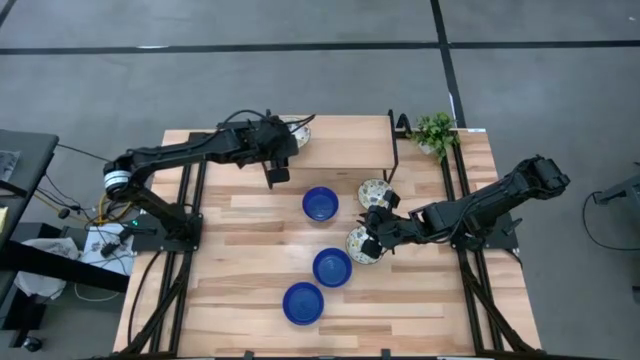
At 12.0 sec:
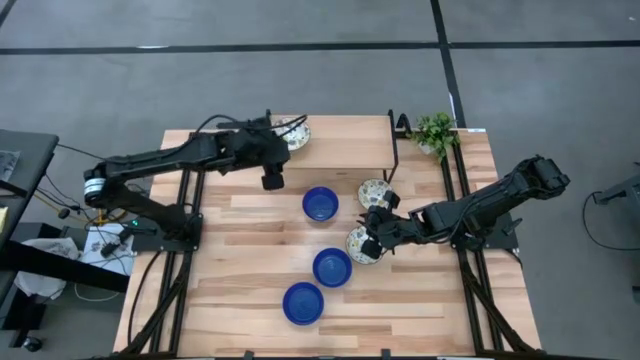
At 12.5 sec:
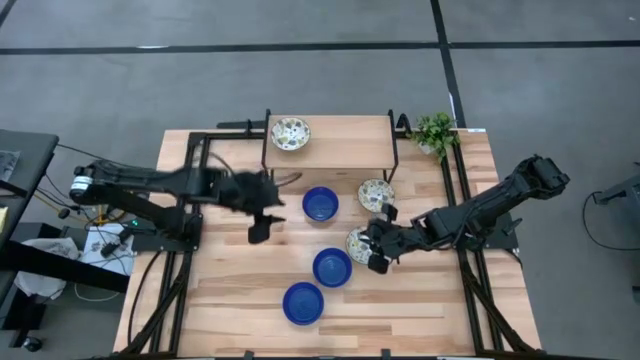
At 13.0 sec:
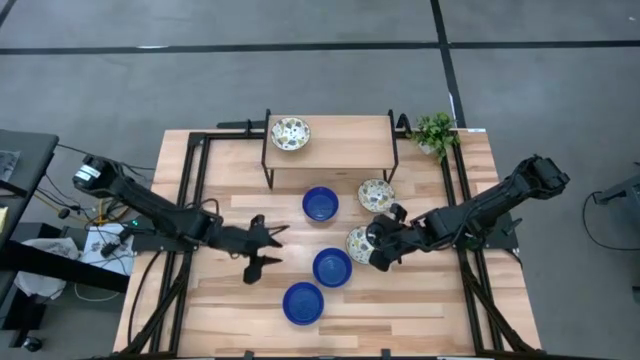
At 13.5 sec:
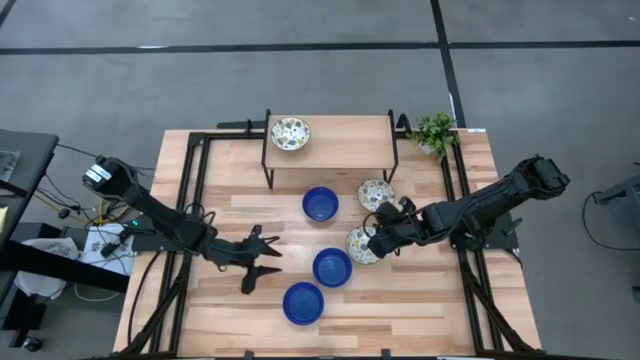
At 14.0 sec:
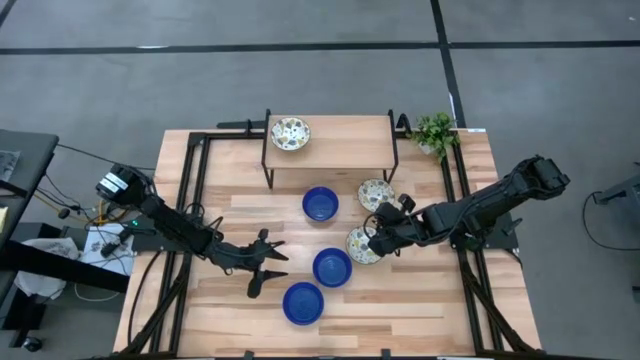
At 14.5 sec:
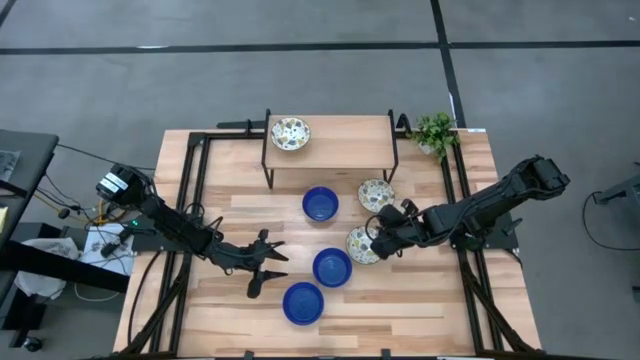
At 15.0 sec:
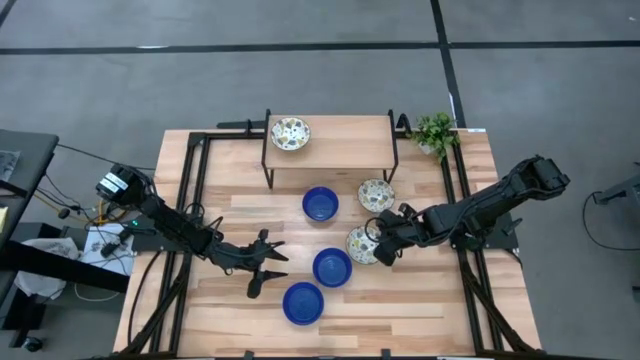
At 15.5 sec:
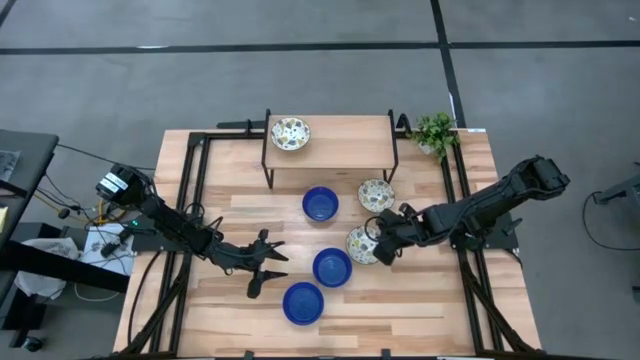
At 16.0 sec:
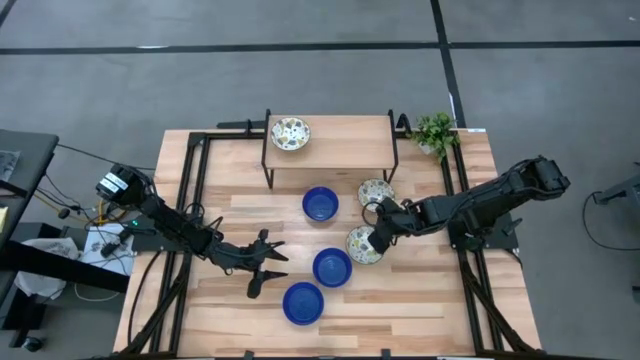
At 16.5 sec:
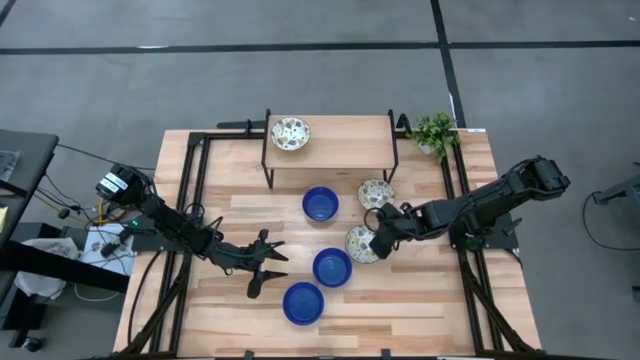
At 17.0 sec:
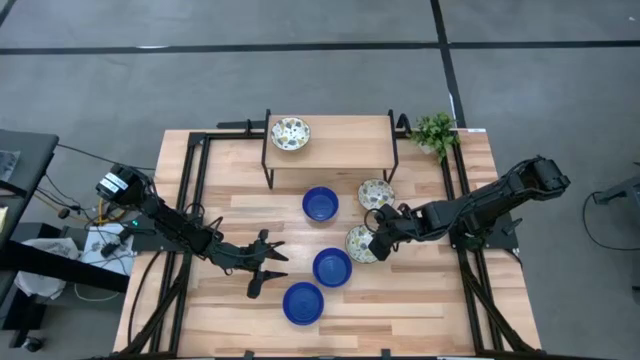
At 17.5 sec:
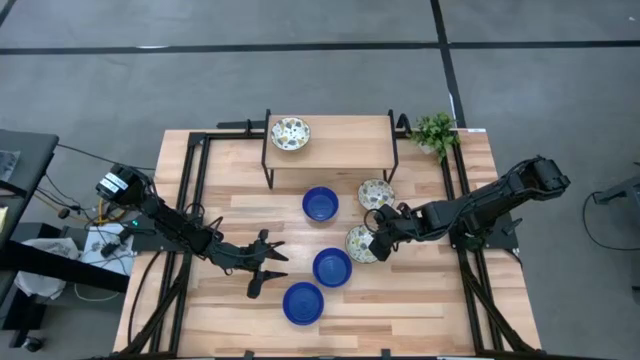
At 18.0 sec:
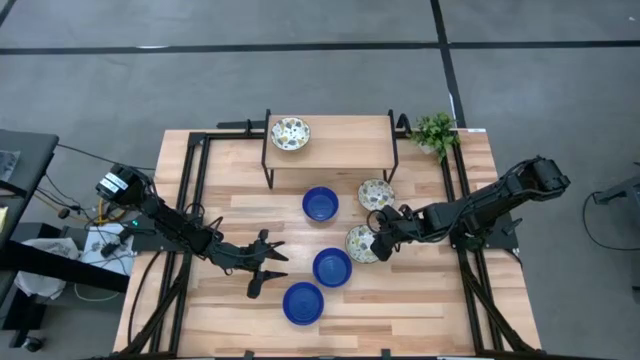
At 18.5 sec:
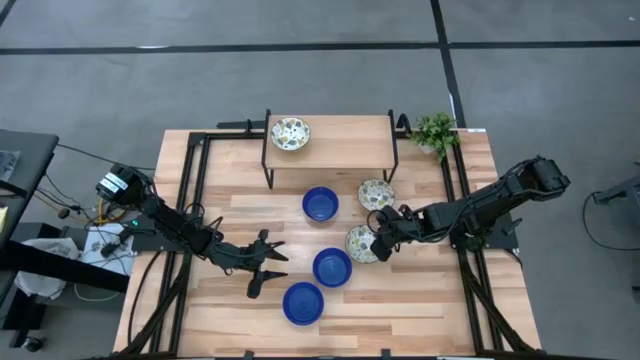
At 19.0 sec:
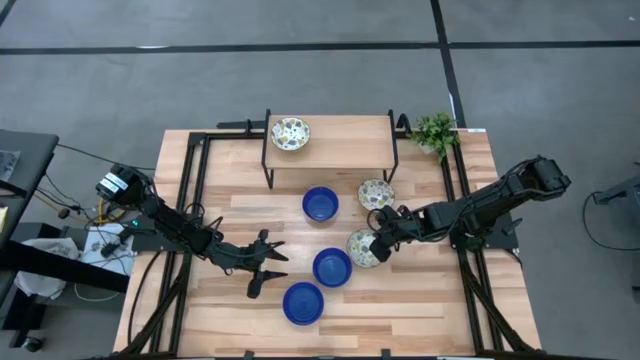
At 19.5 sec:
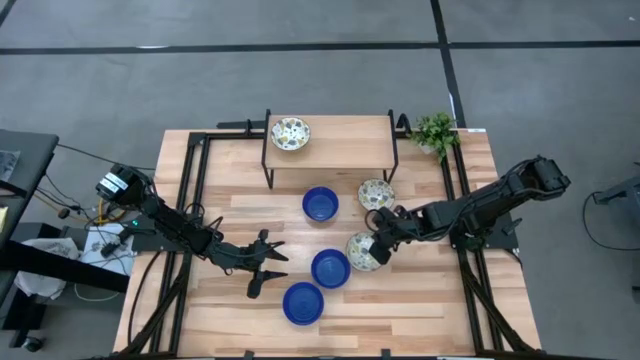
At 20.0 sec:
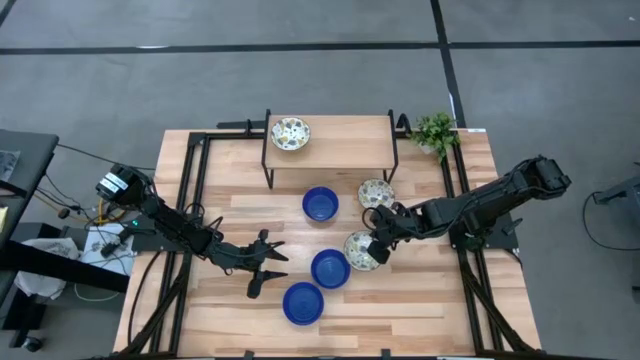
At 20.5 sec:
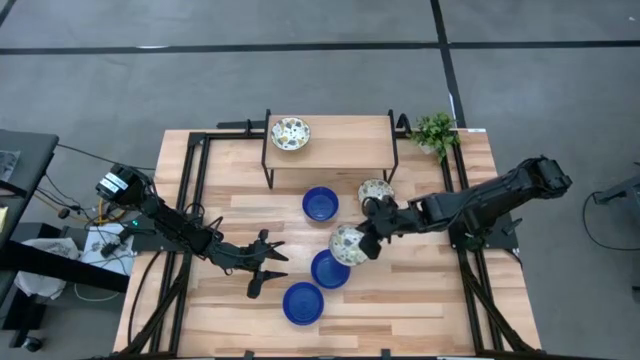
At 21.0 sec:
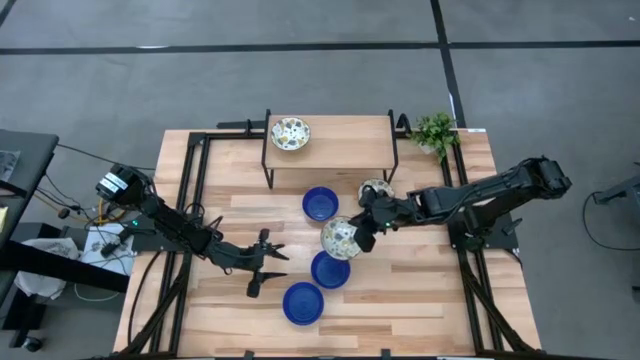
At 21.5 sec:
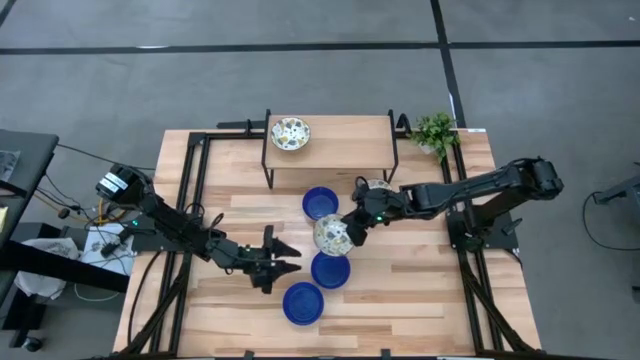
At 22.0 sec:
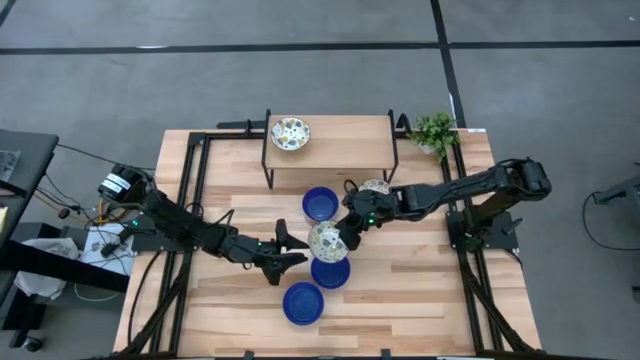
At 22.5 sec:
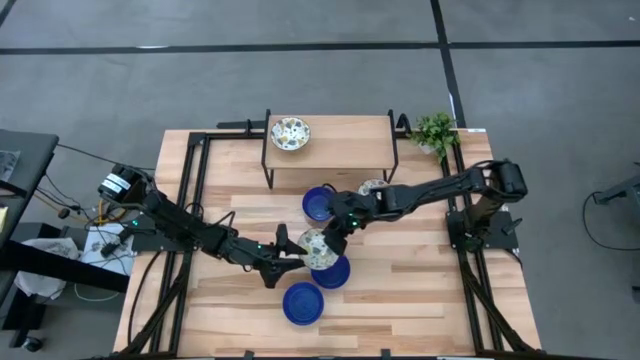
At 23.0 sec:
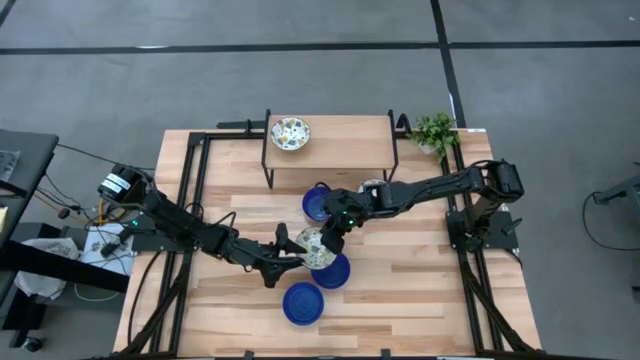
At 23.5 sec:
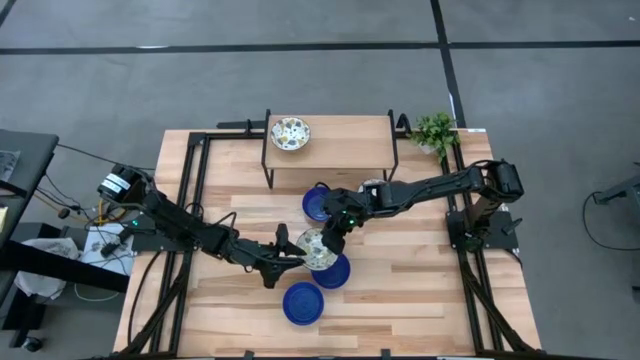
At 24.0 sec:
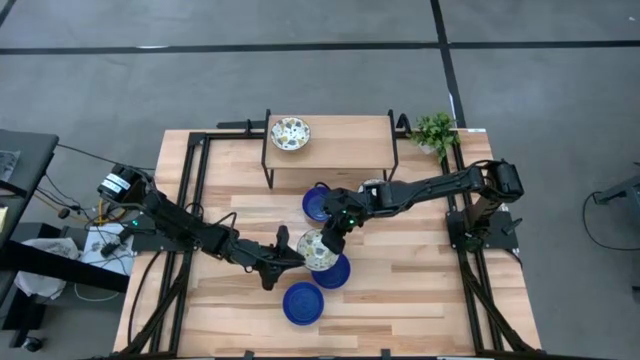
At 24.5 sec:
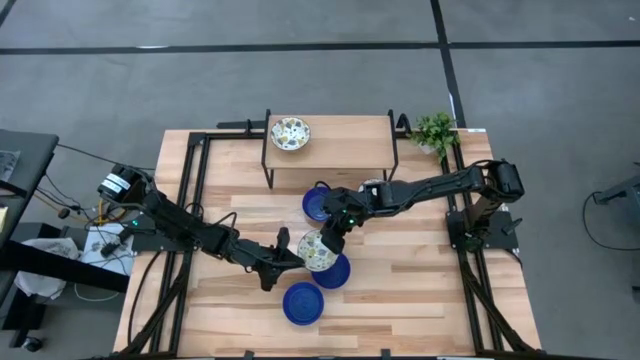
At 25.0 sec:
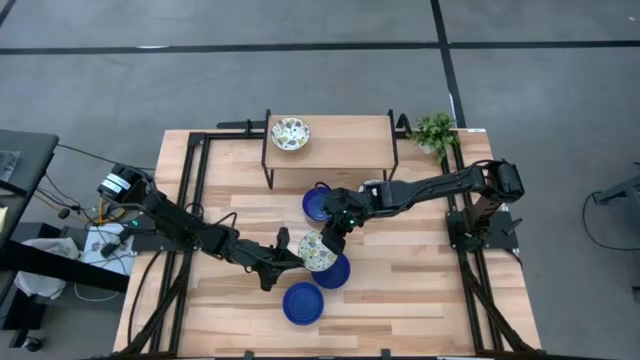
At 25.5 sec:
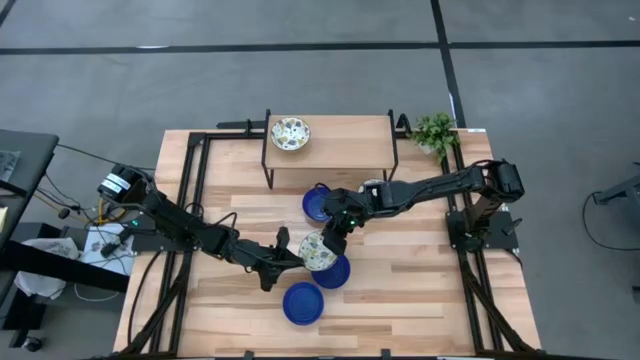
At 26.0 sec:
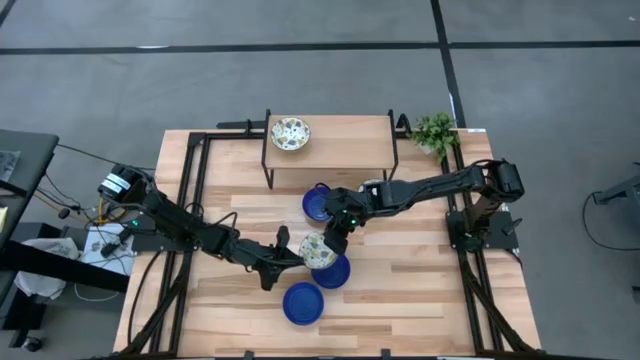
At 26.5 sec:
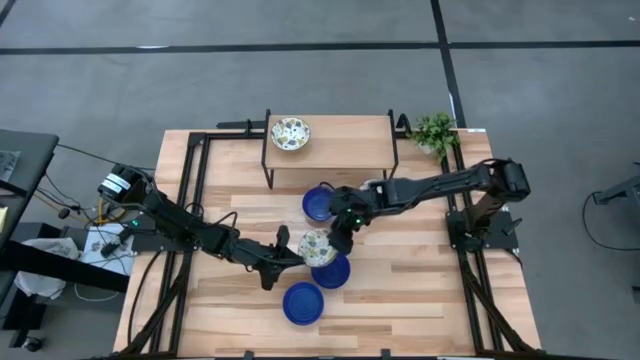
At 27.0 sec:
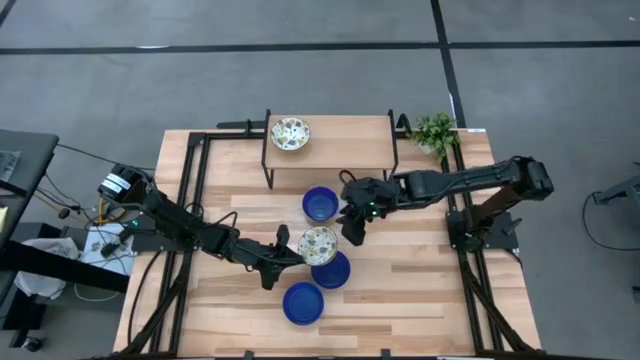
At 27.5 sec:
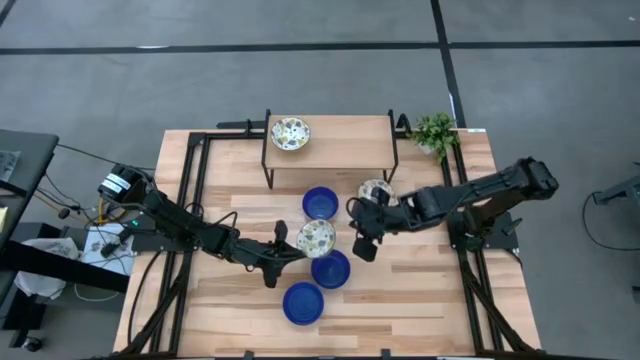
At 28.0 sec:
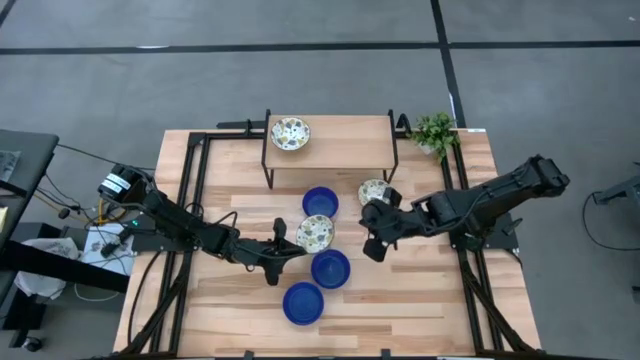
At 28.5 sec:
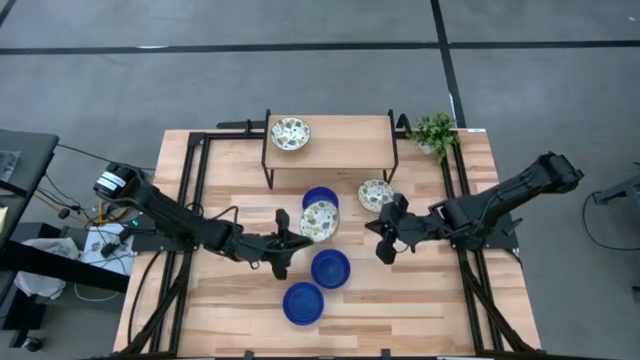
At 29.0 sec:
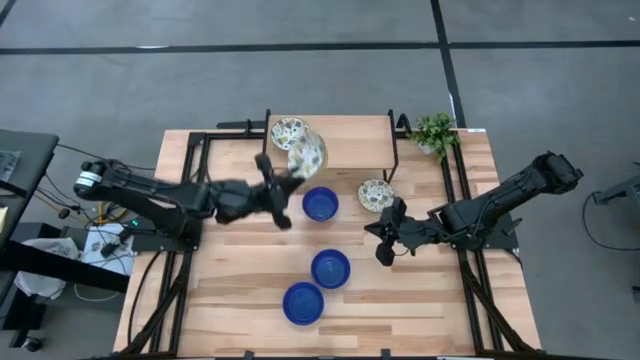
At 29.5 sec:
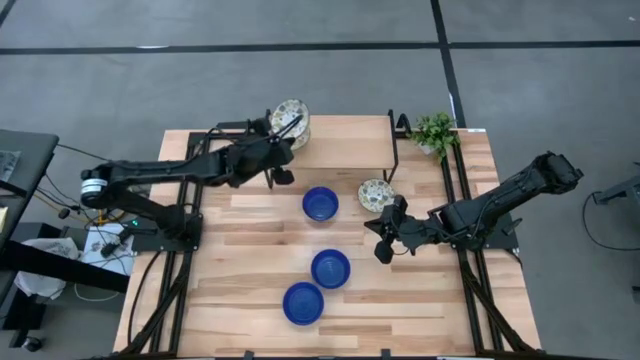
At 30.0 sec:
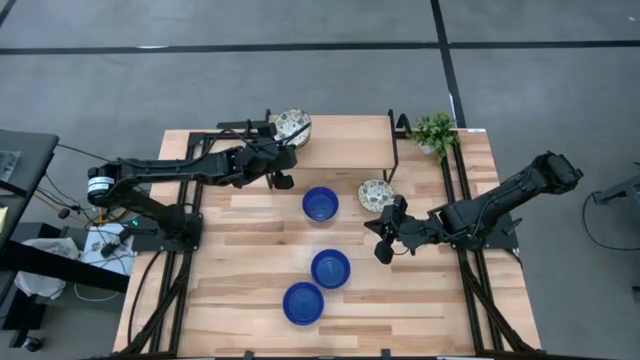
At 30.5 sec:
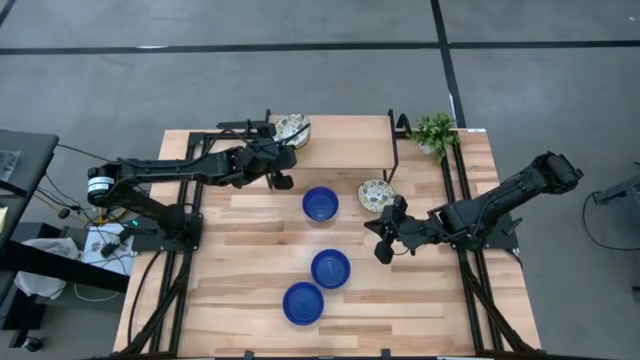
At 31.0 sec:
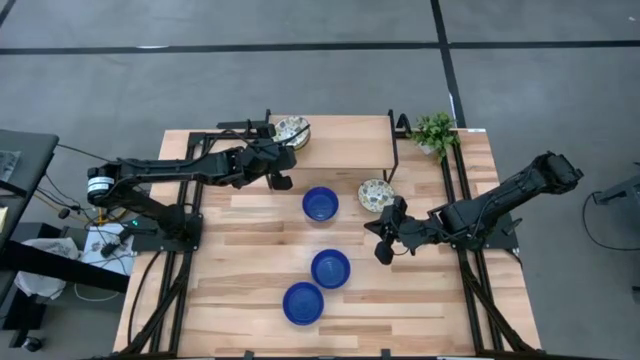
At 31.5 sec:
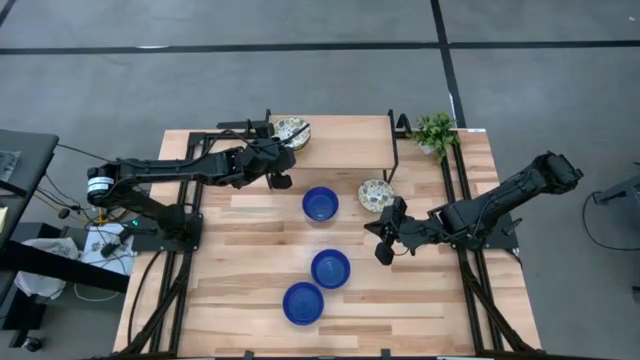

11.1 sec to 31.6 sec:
Task: Pick & Place Mini bowls
Put the bottom white patterned bowl on top of the white patterned bowl on the shelf
